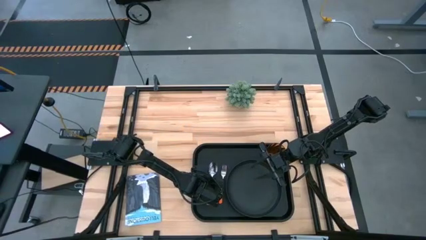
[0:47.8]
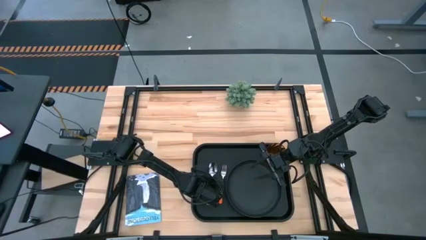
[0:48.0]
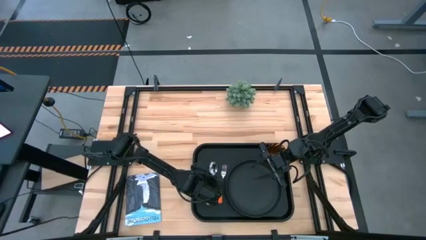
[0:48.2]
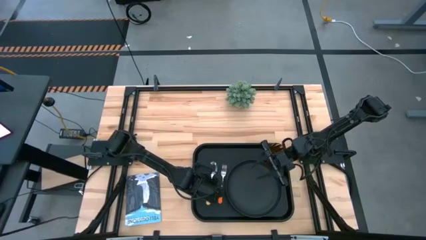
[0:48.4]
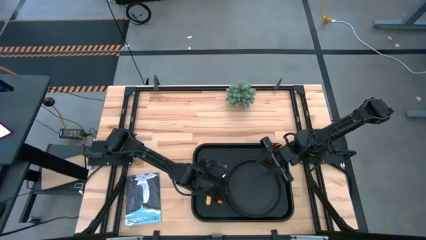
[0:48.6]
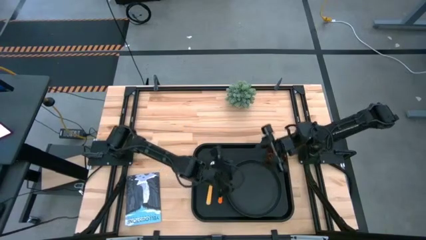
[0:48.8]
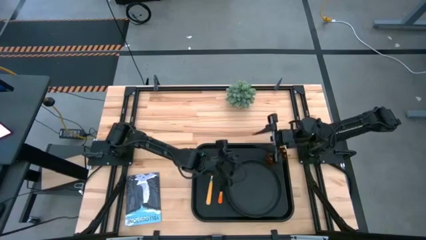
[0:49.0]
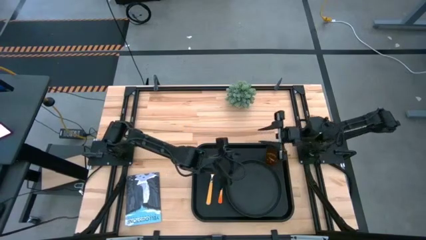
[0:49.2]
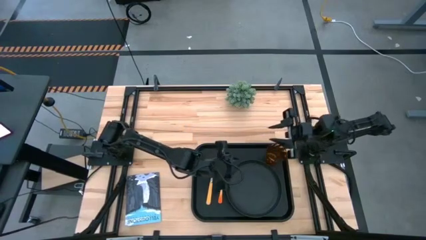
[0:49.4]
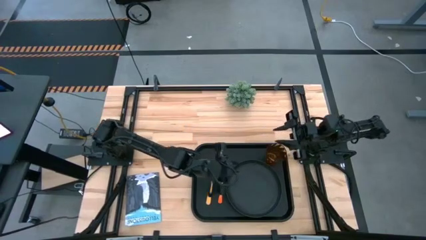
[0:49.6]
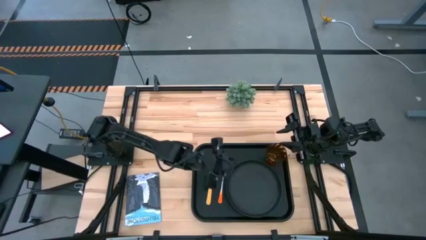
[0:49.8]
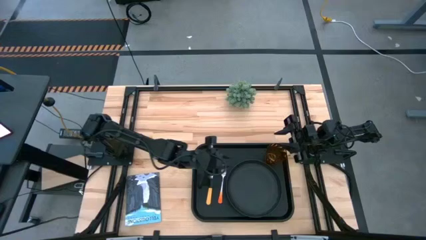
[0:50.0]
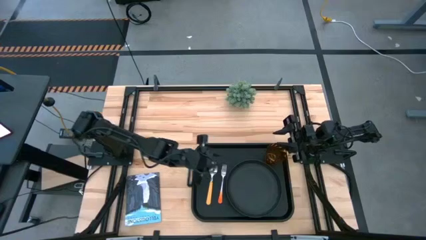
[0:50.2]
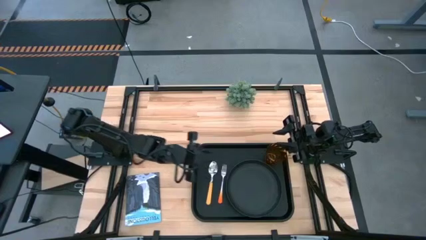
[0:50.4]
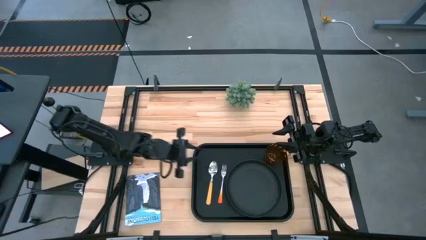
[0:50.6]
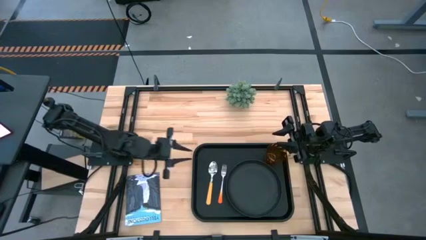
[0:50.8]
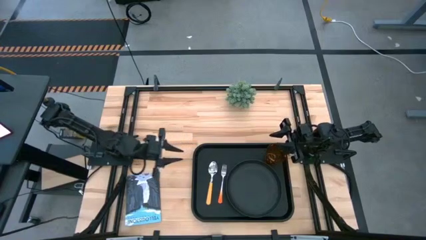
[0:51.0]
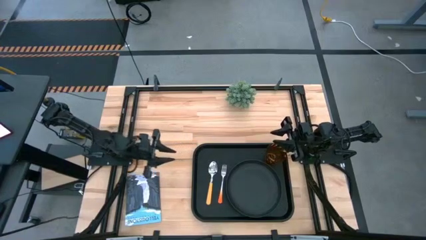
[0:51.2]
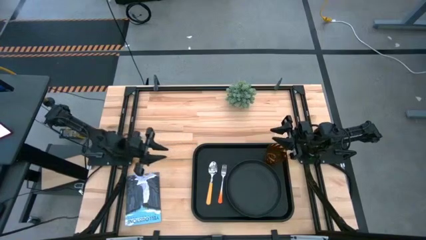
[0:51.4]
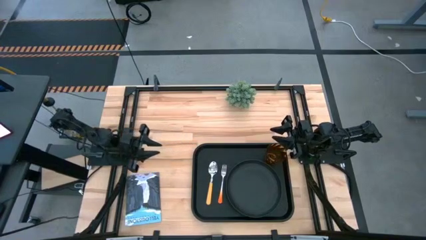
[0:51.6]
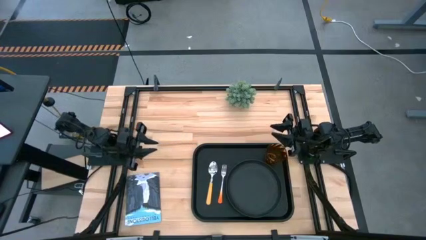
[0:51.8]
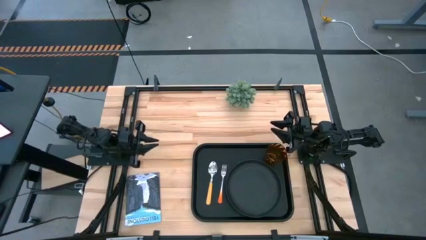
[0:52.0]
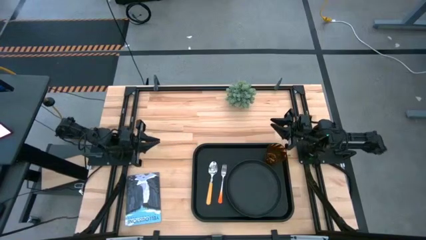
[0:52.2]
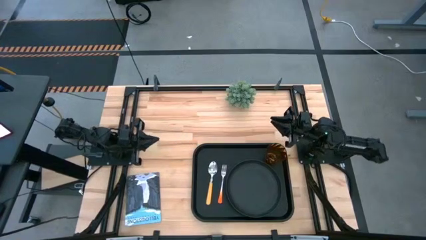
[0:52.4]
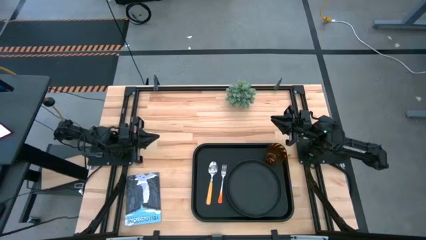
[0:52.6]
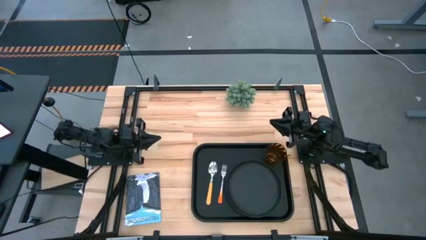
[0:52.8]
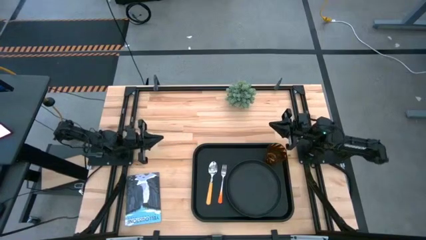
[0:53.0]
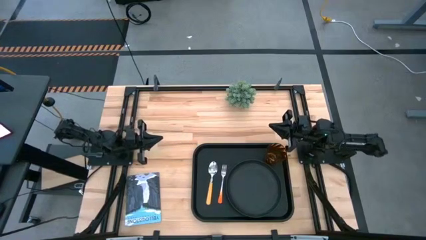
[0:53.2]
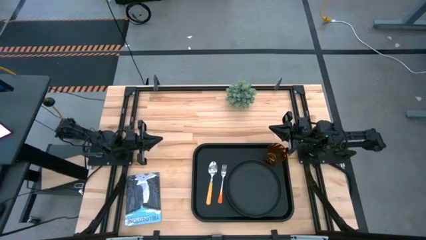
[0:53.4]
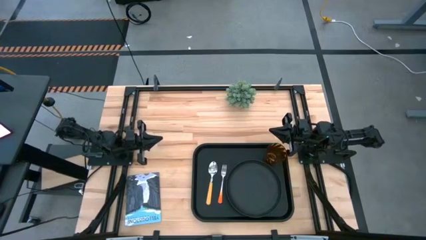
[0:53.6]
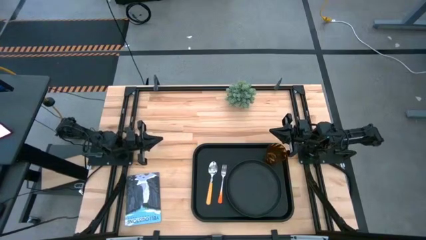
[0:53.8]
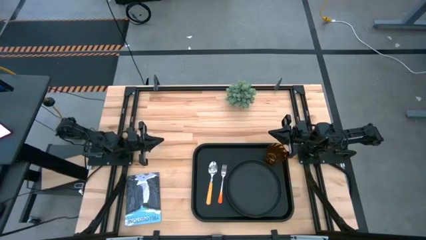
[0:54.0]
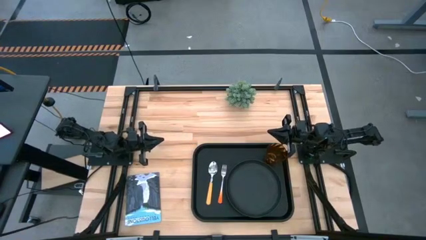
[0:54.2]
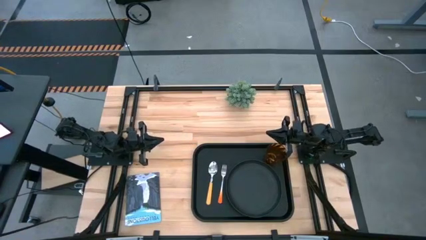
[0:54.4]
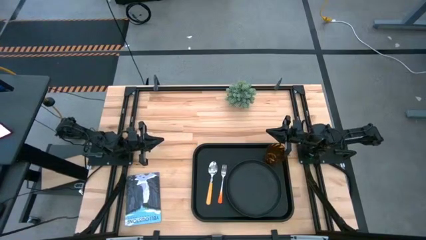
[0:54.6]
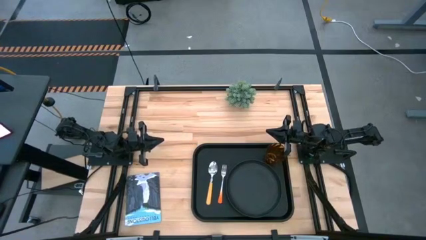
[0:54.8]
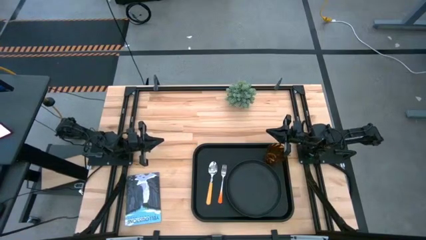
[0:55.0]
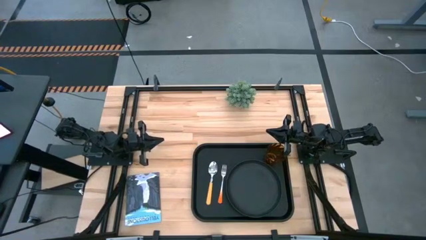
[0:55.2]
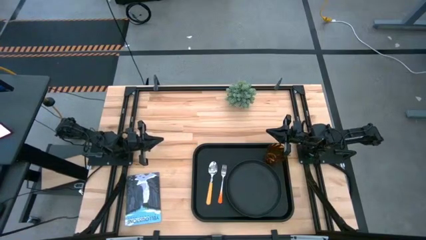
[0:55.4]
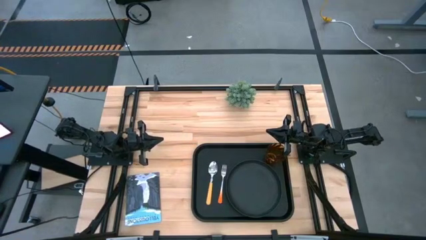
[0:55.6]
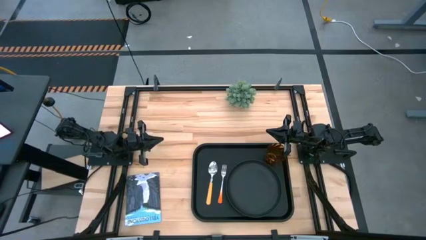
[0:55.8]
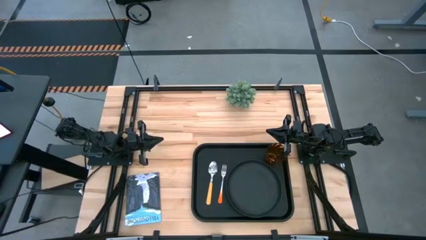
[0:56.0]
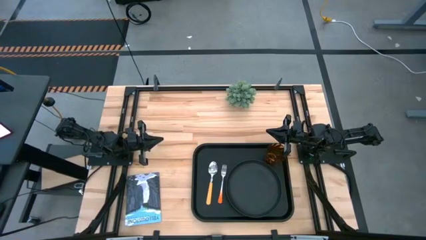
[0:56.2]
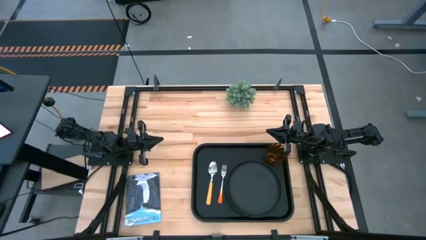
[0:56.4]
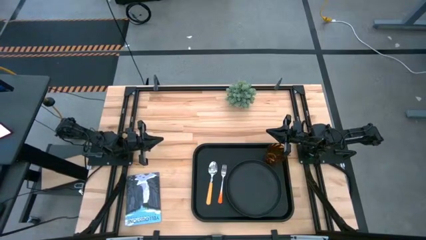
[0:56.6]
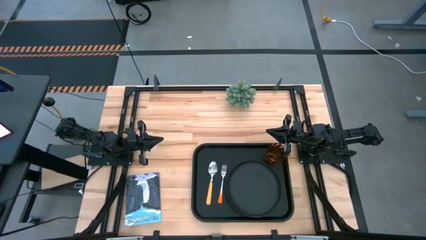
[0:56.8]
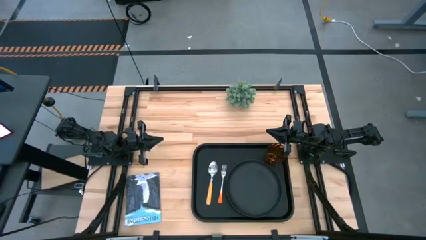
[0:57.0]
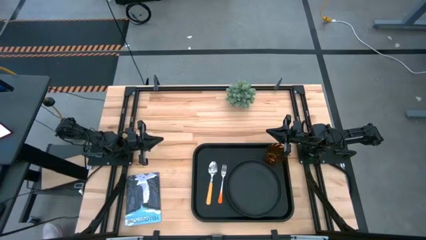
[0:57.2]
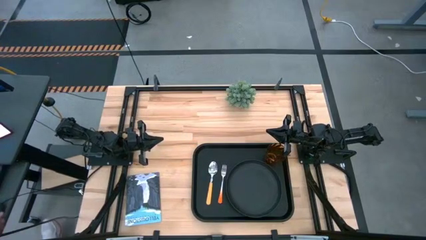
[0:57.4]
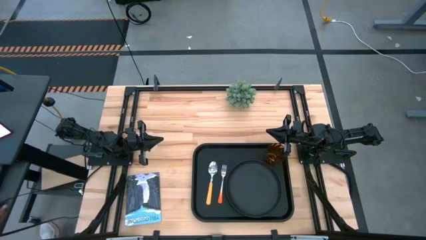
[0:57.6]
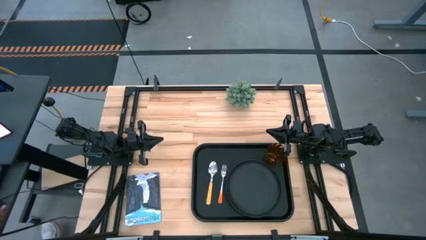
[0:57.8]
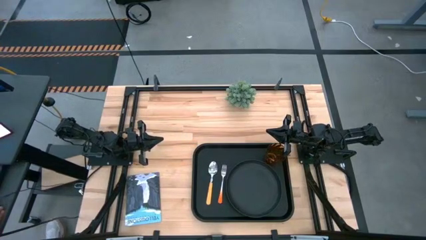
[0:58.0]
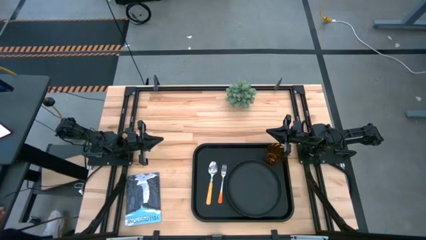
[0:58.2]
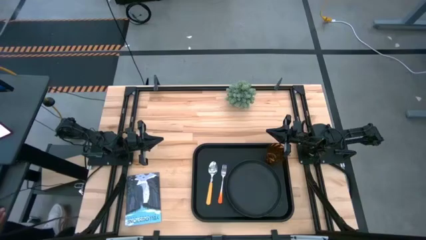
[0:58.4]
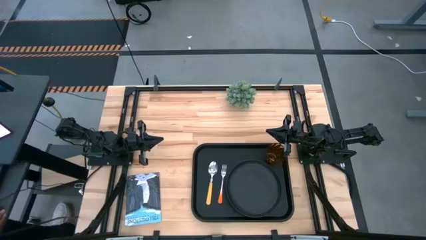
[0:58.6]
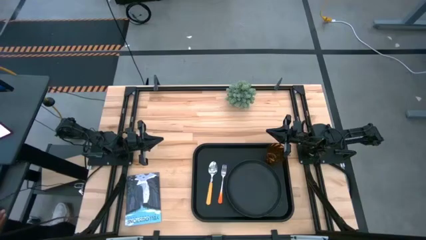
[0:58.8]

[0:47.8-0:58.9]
Task: Pick and place plate/cup/fork/spoon on tray
Return to home Position

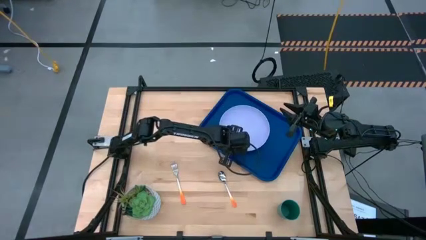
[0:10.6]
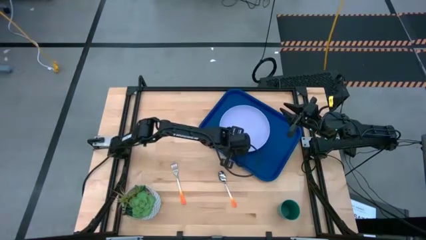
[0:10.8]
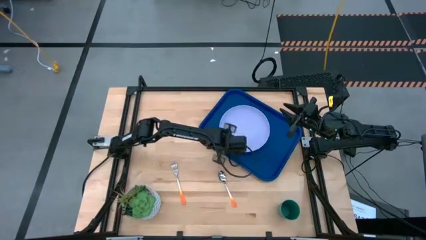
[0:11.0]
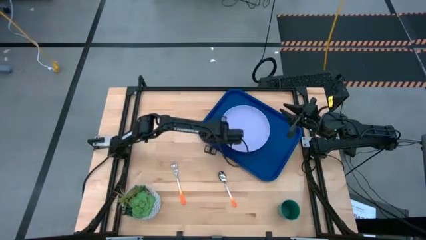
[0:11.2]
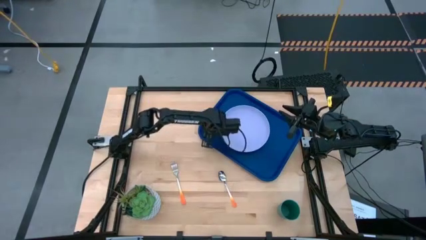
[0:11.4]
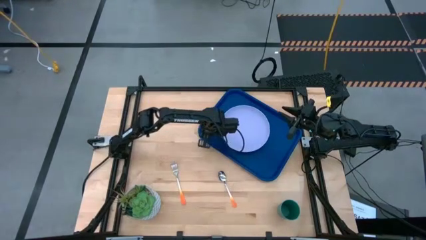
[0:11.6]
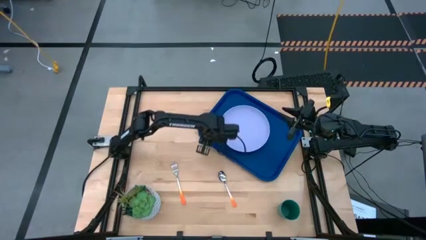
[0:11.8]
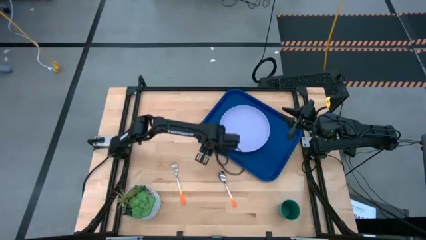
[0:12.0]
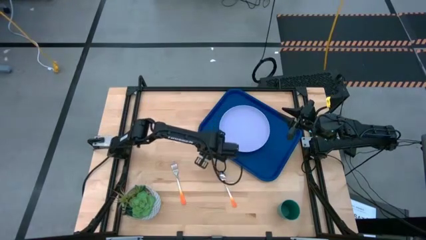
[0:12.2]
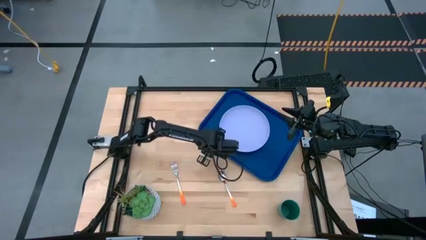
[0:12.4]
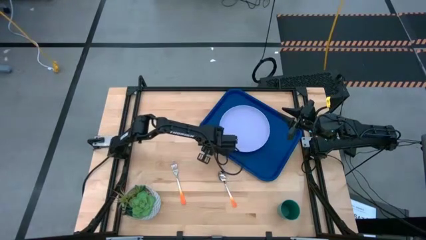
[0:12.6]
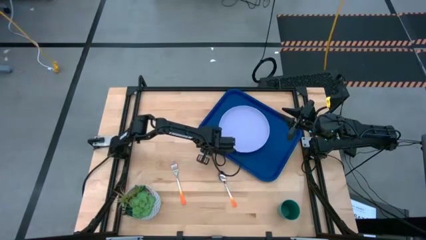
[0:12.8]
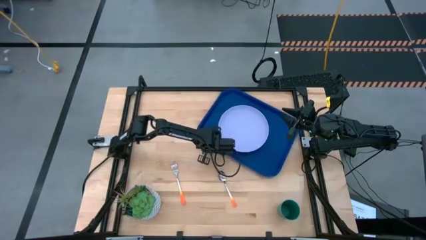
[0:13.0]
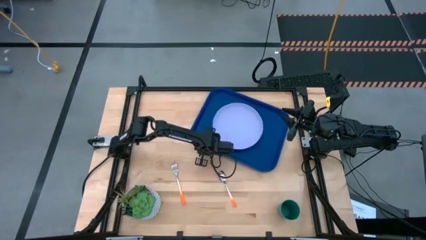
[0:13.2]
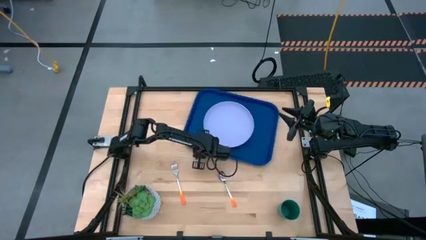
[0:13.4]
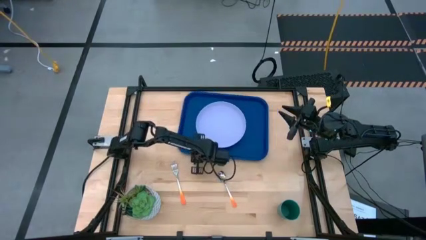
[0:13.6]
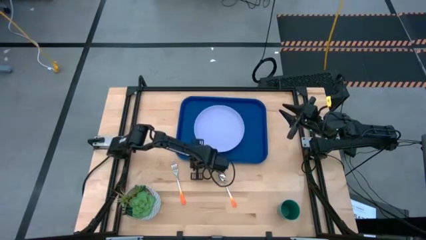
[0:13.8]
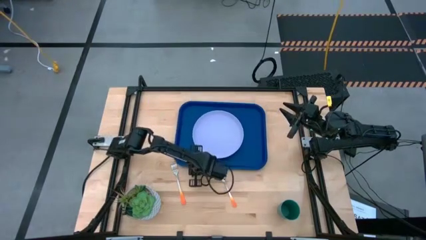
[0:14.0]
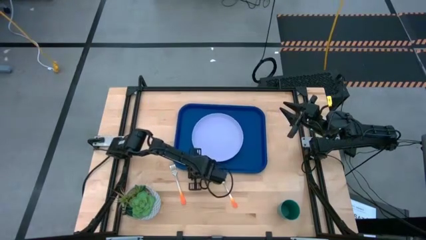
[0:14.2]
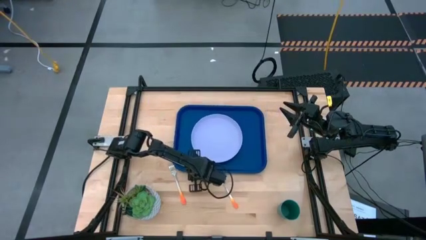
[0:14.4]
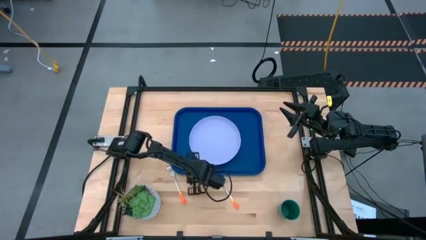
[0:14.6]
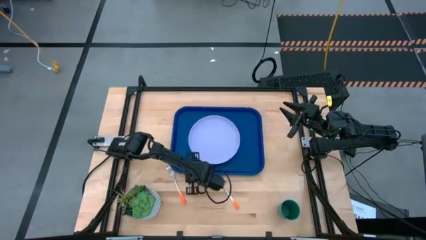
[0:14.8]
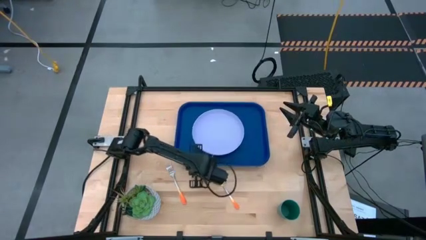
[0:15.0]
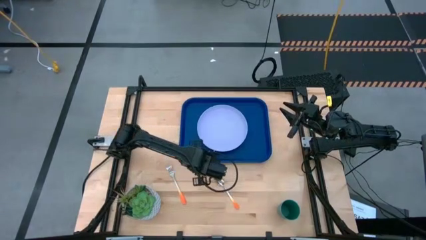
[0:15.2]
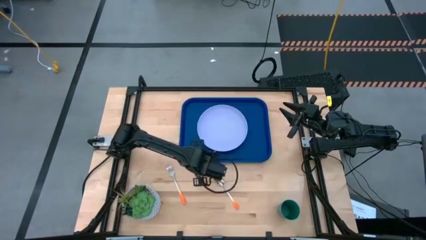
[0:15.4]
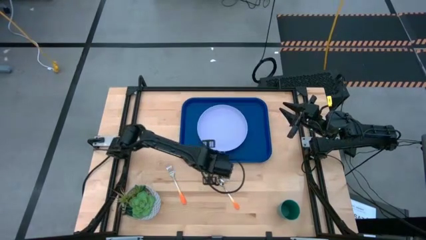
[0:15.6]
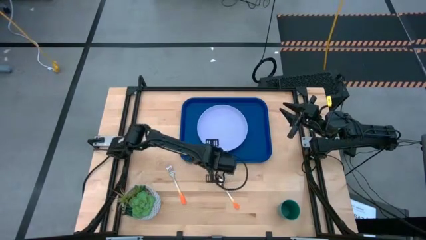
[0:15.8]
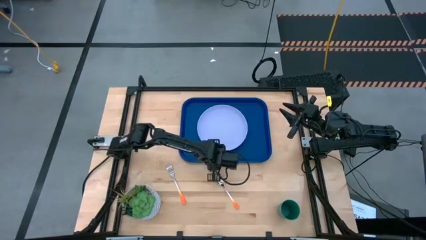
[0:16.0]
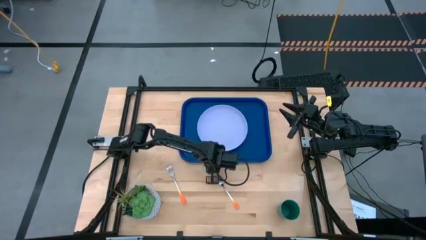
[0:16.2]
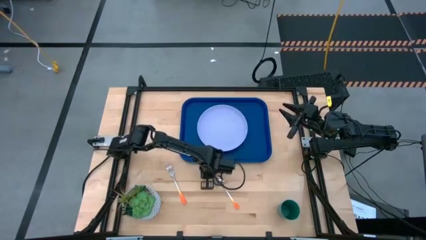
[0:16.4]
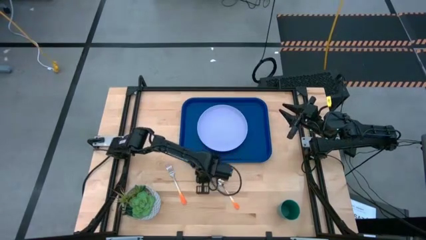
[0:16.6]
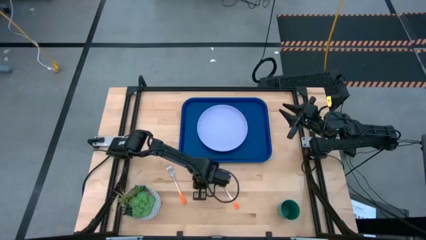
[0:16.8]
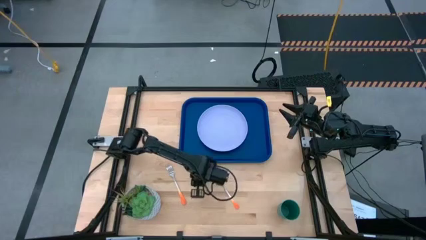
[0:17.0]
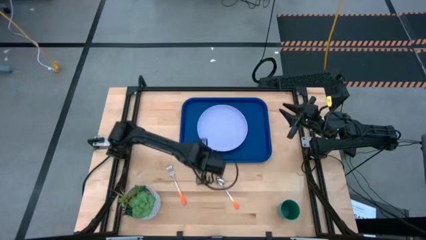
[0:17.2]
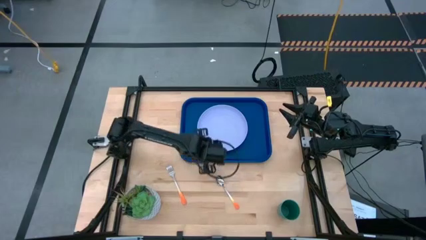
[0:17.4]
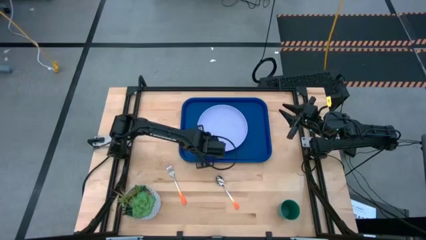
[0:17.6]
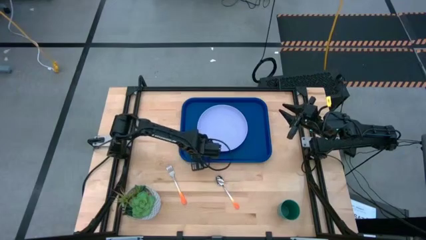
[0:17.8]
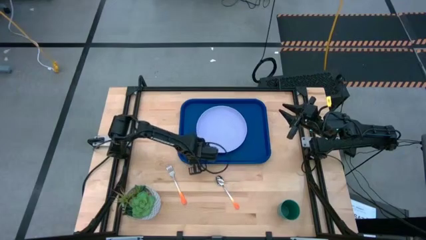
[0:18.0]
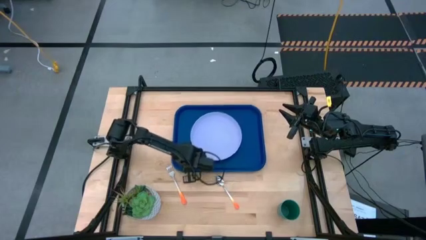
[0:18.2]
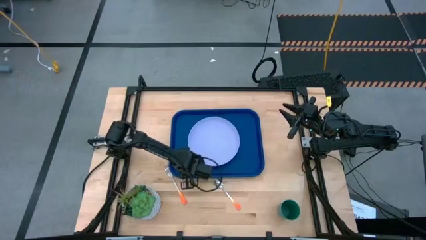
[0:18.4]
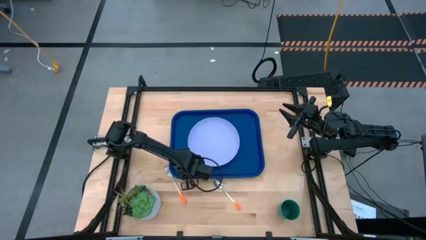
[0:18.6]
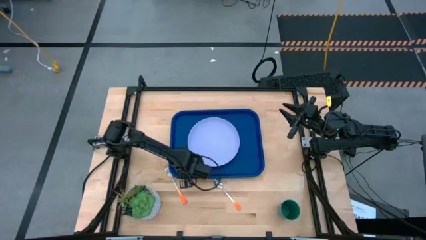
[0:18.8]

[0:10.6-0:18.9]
Task: Pick and place plate/cup/fork/spoon on tray
Move the serving tray to the center of the table
